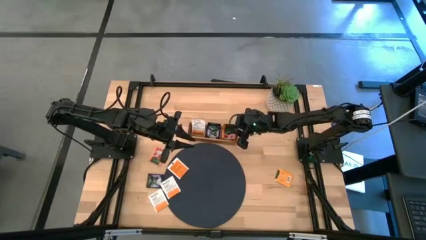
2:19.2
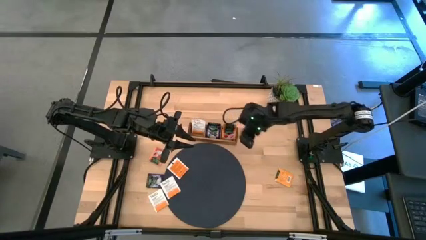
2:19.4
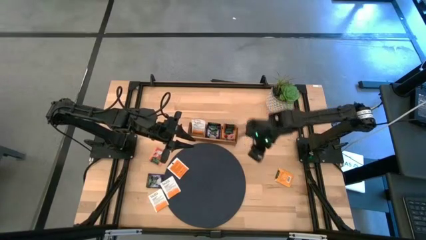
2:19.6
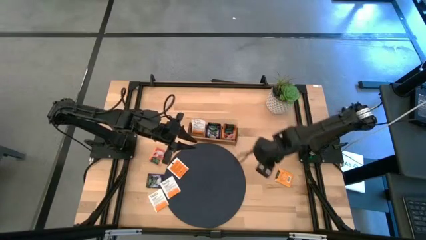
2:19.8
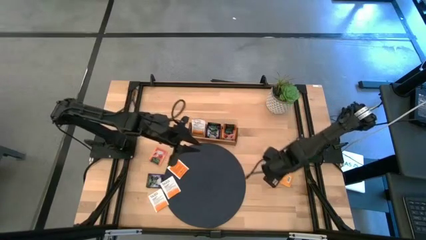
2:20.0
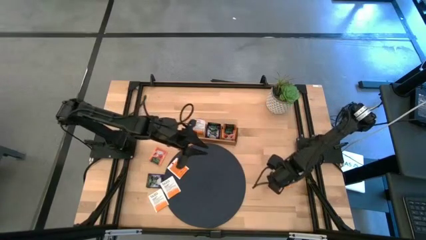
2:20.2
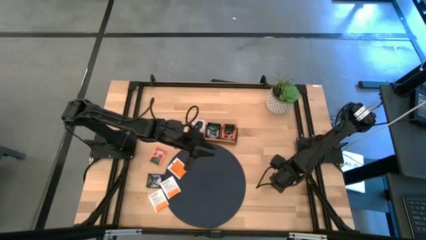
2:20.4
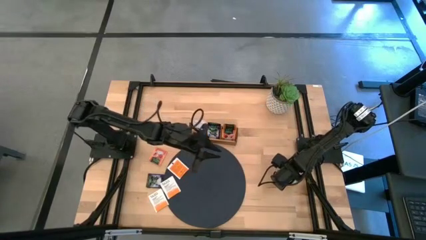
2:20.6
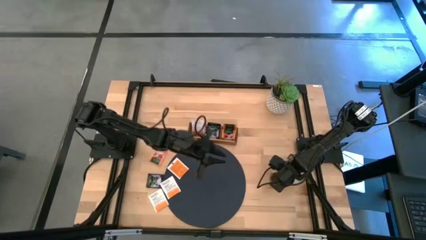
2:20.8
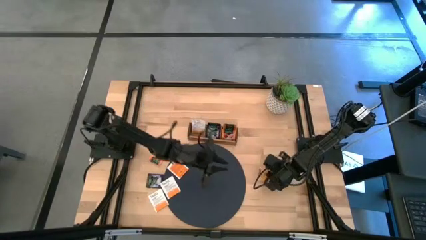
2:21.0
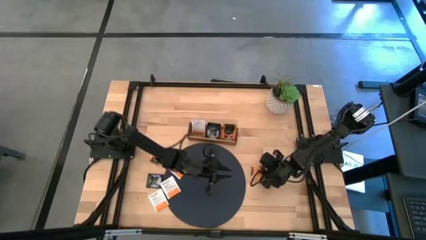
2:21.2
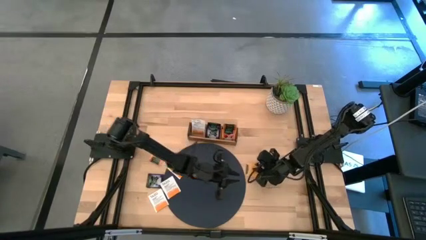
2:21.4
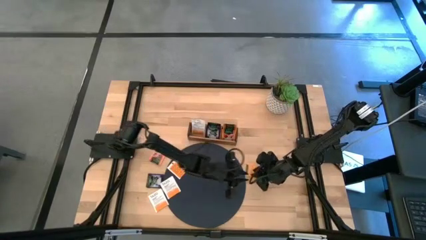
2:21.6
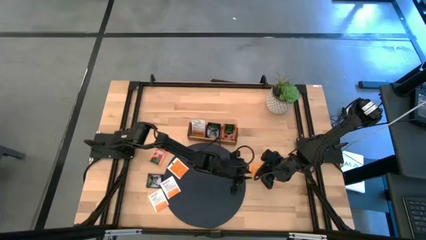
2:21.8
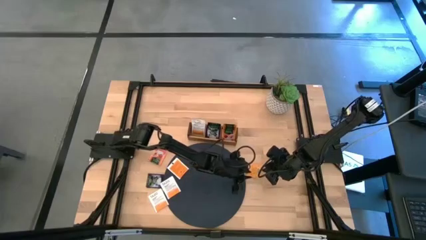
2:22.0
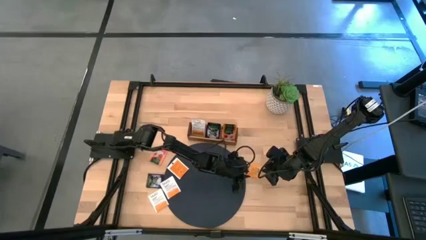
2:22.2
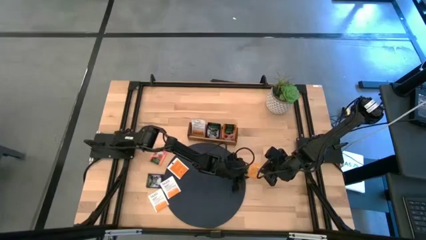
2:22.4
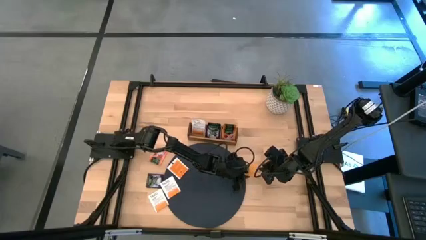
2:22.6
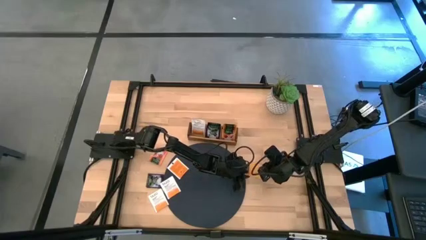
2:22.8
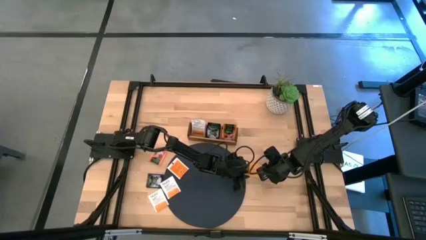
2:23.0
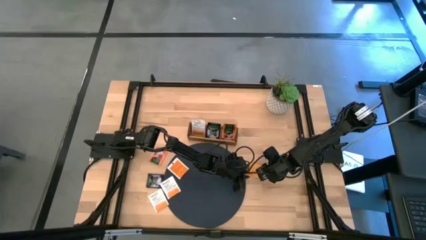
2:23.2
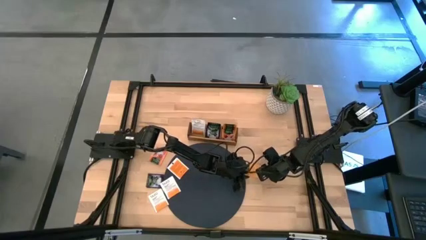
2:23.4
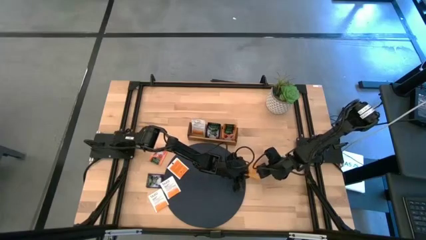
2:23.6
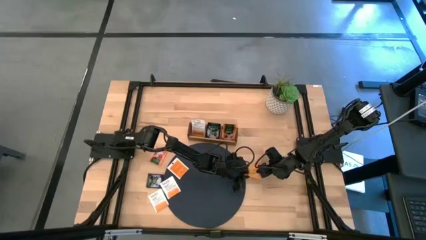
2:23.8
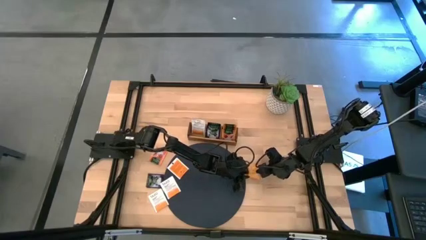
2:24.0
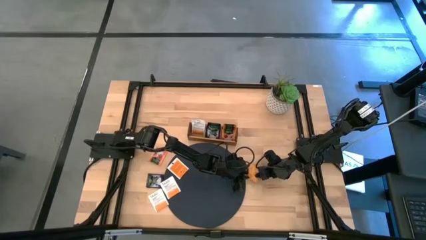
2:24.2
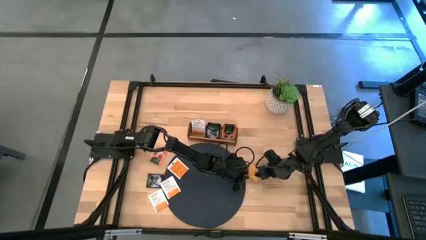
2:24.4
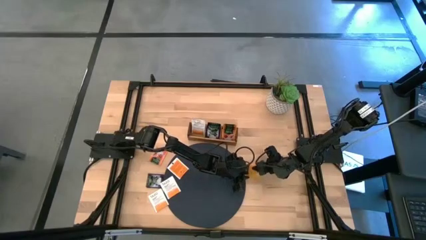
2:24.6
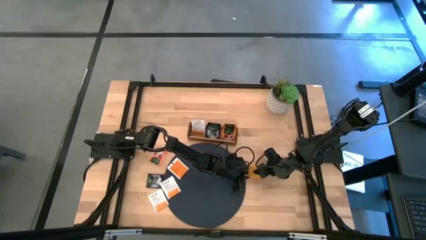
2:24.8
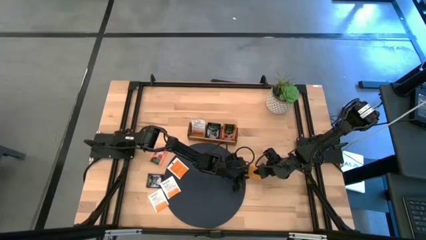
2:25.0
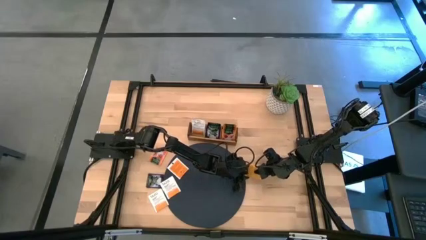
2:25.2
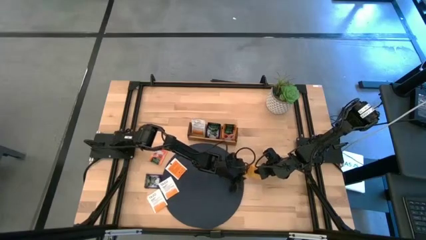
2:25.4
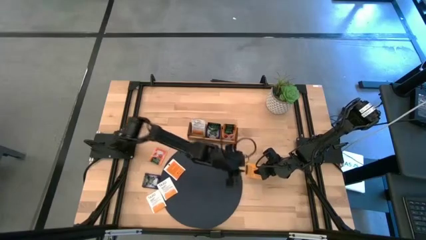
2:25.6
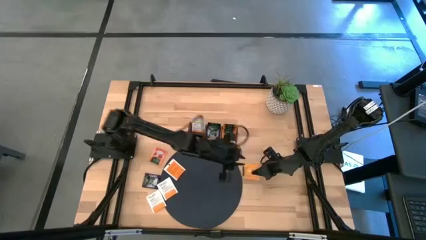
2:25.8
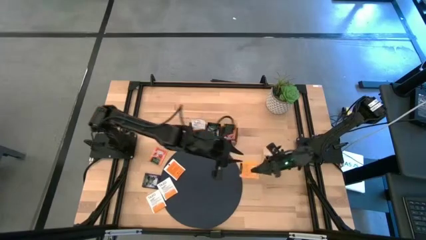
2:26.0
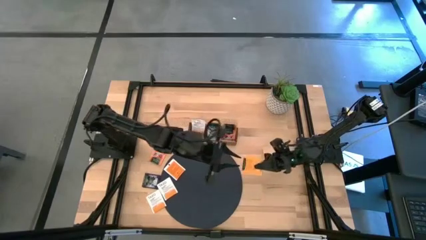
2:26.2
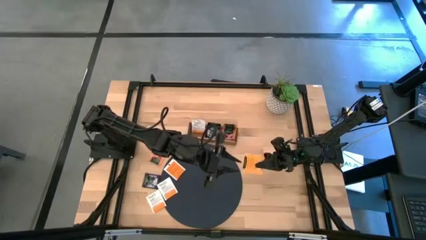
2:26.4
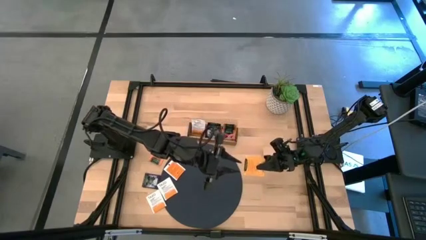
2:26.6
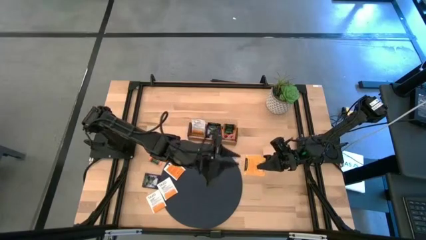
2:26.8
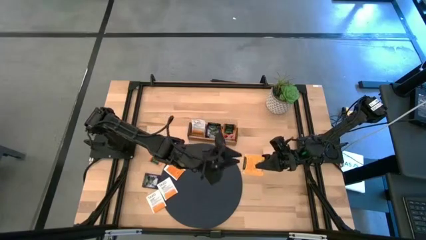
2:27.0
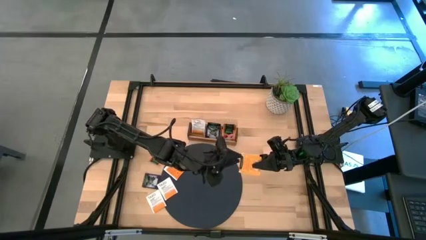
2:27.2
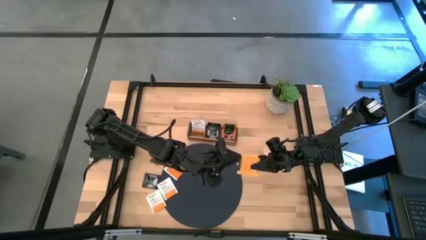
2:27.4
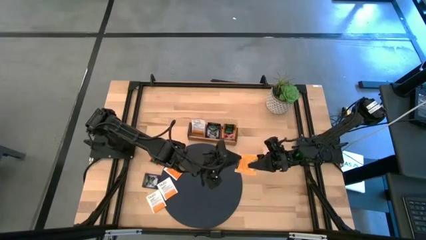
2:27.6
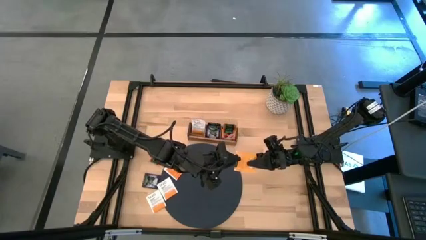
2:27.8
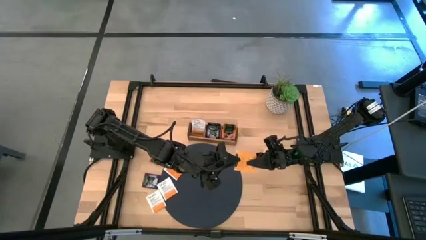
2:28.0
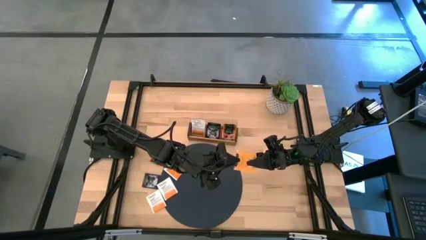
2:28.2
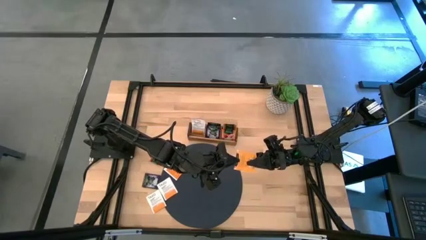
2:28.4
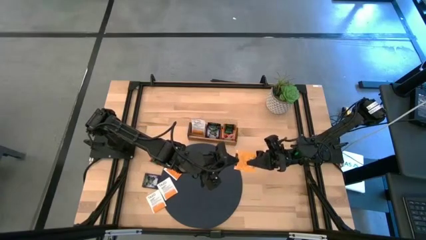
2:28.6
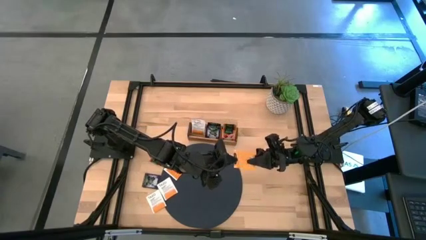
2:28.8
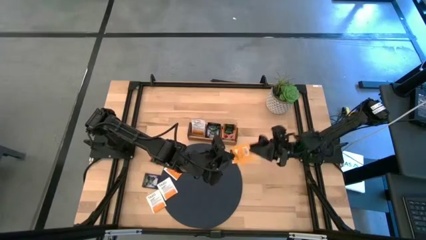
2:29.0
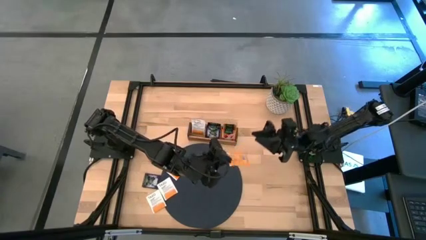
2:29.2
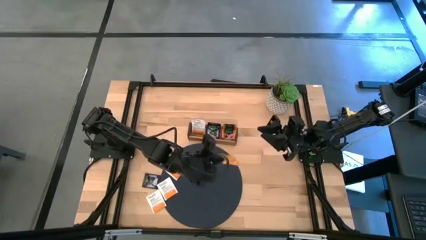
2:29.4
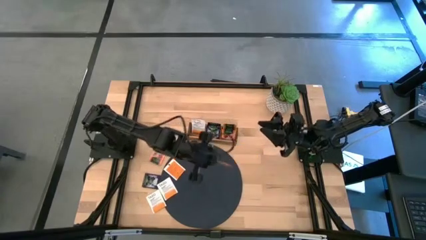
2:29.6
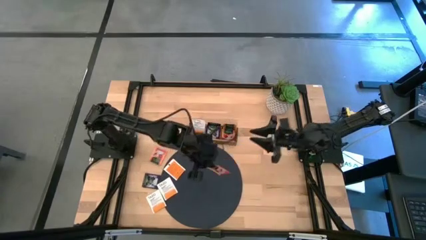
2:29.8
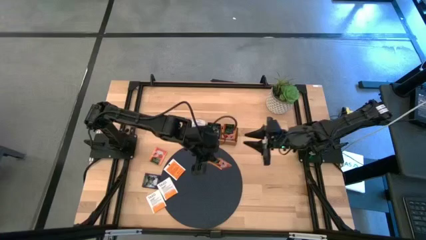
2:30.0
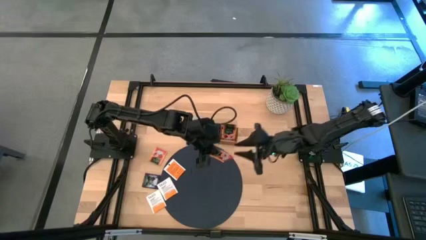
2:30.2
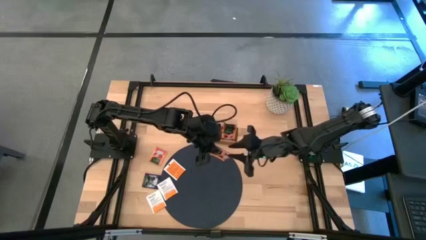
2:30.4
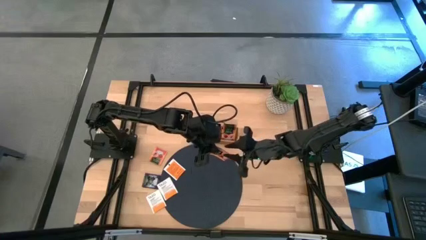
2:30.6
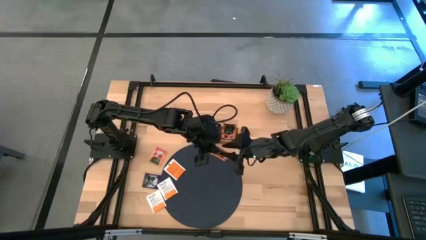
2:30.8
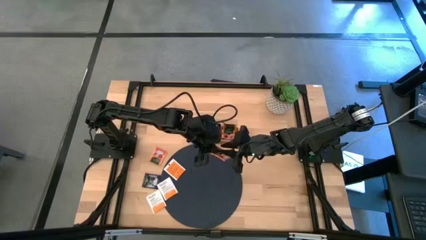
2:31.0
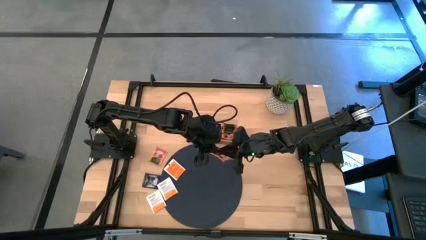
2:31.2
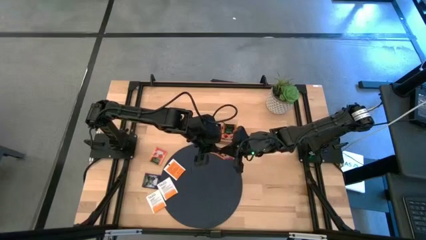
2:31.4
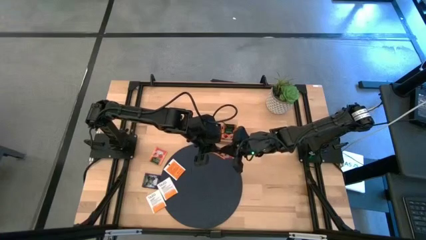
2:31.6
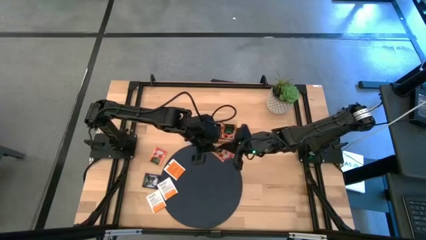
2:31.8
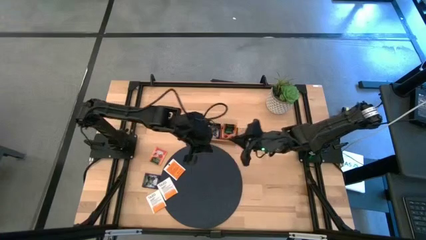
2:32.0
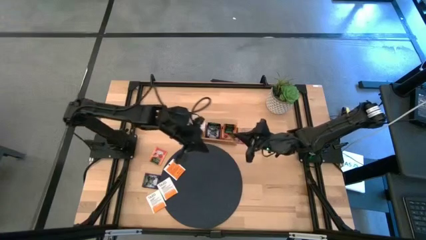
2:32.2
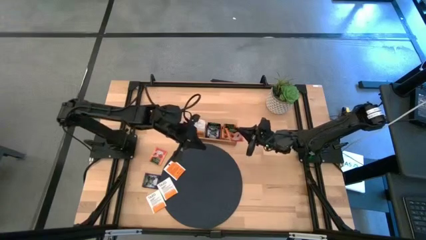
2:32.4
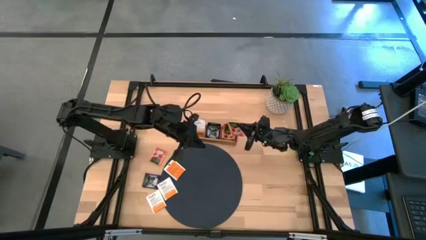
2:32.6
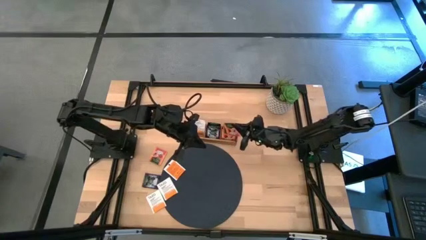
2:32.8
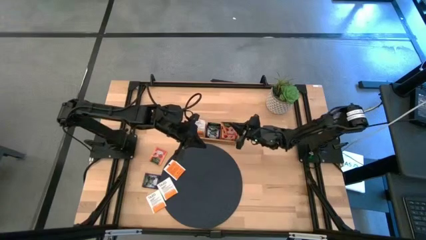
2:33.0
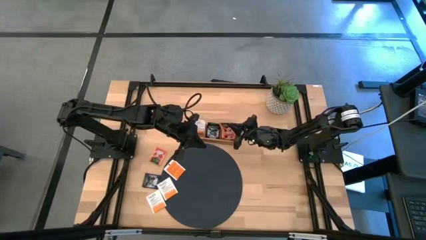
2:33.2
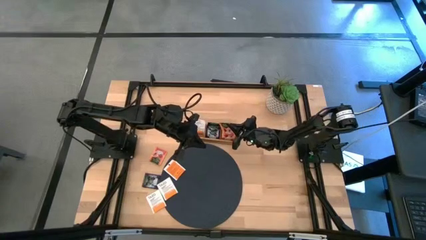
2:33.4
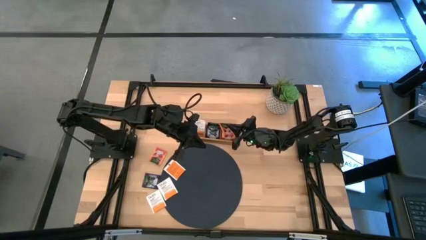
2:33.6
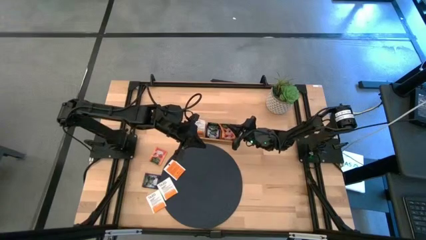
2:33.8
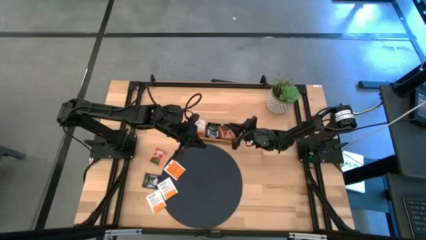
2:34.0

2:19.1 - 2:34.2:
Task: Pick & Place Tea
Put the orange tea bag into the right of the wooden organizer

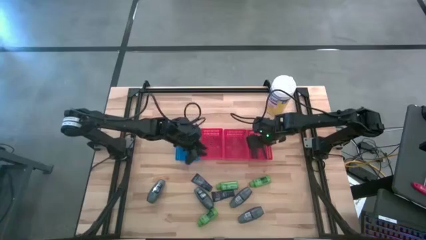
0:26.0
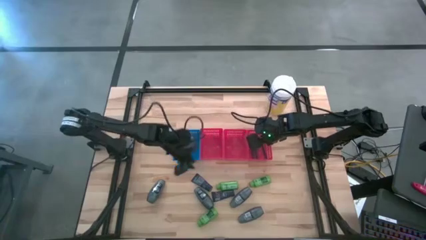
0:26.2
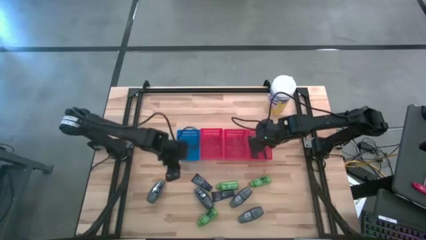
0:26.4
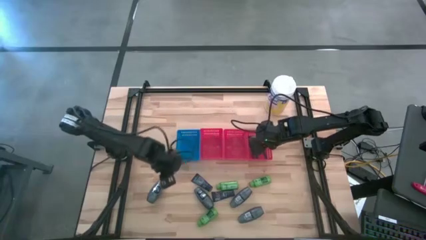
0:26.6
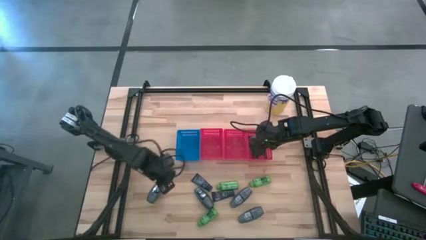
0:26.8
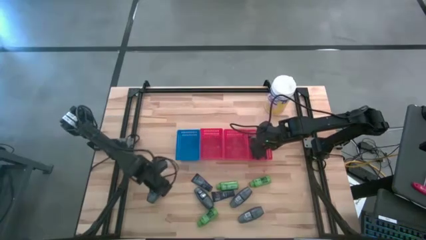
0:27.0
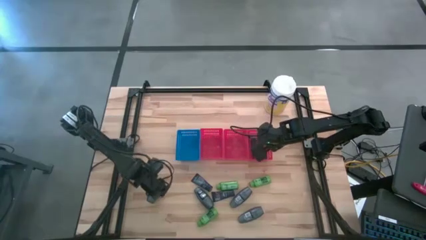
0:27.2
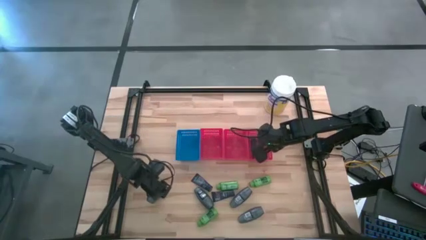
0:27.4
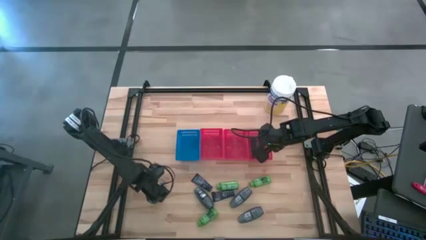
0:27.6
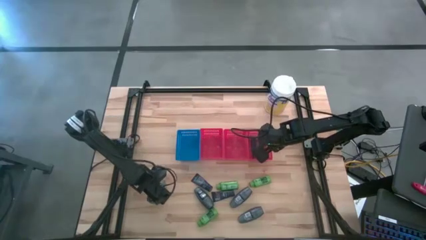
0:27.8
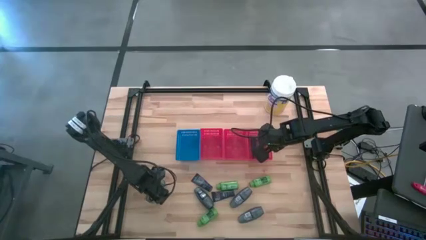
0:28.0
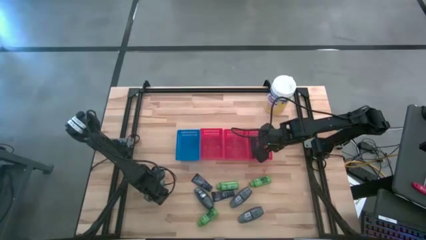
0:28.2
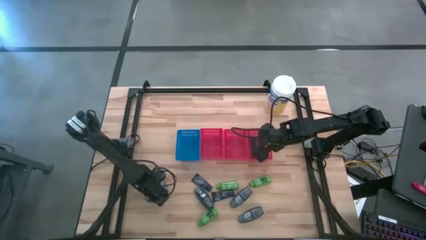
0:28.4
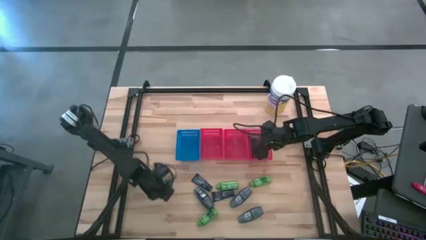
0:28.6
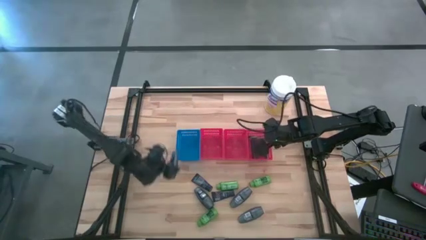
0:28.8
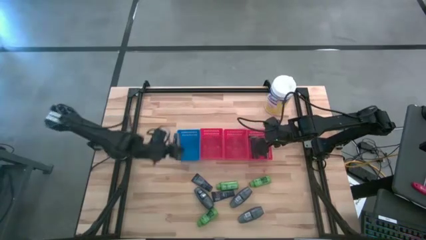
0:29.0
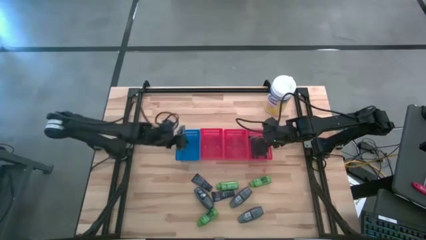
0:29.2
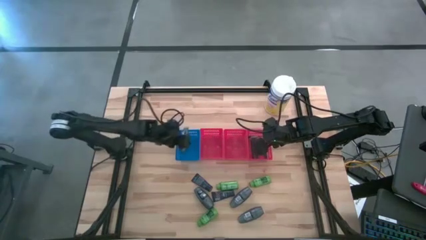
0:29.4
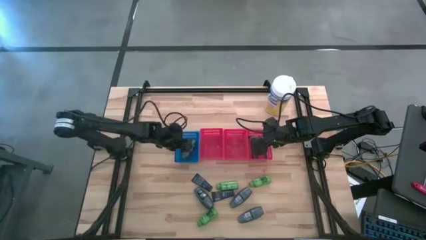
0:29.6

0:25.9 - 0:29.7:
Task: Pick & Place Travel size toiletries
Put the gray deodorant into the blue bin
